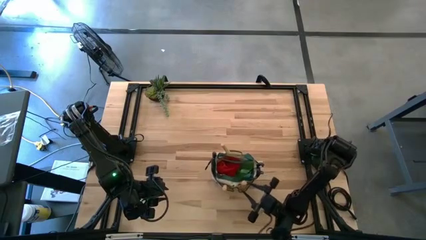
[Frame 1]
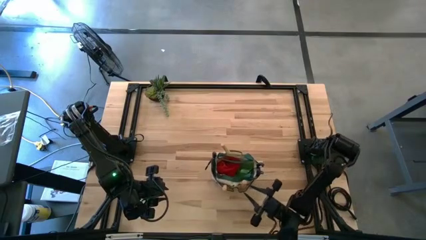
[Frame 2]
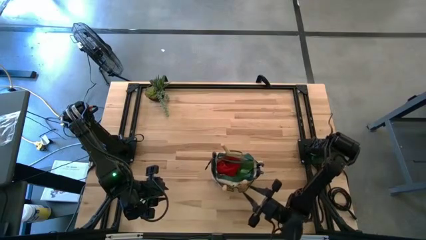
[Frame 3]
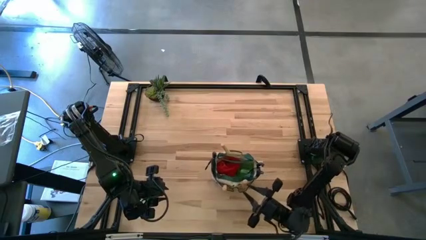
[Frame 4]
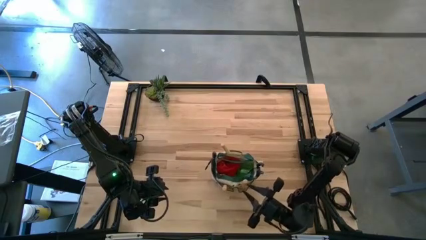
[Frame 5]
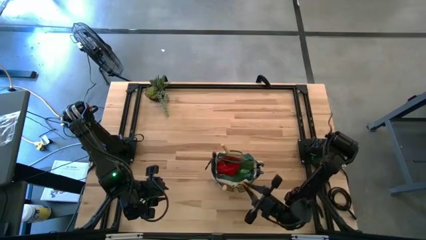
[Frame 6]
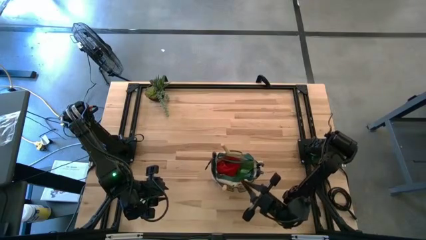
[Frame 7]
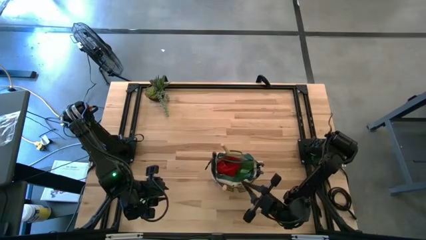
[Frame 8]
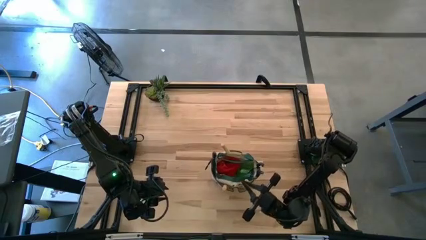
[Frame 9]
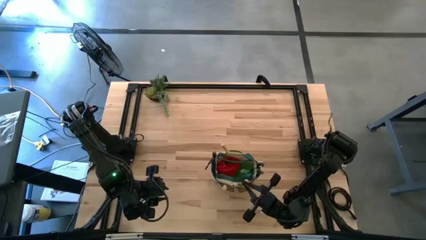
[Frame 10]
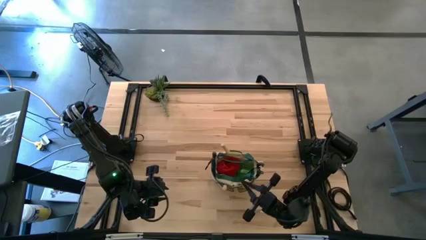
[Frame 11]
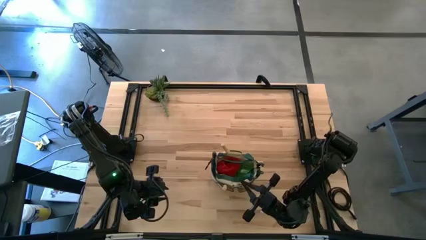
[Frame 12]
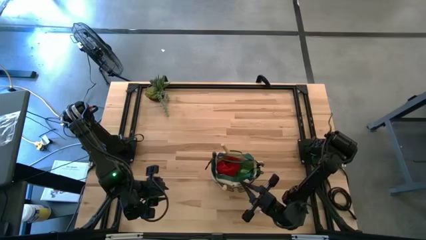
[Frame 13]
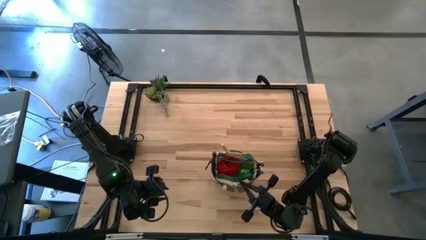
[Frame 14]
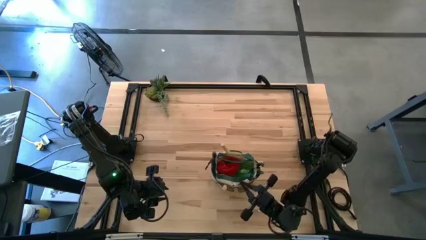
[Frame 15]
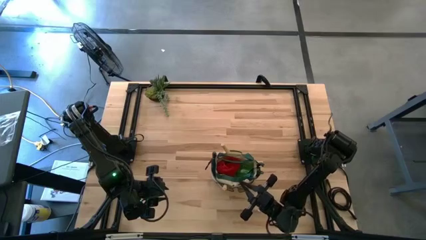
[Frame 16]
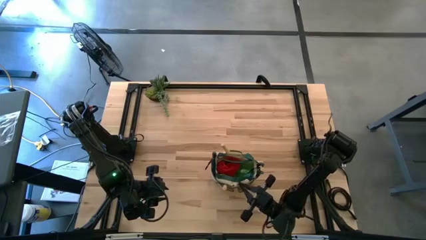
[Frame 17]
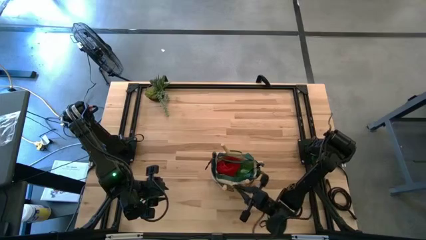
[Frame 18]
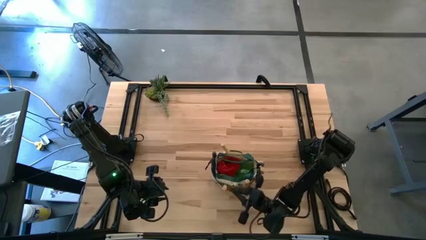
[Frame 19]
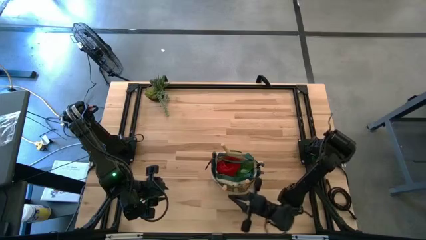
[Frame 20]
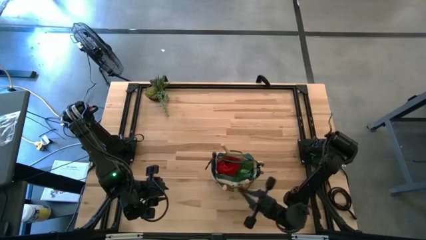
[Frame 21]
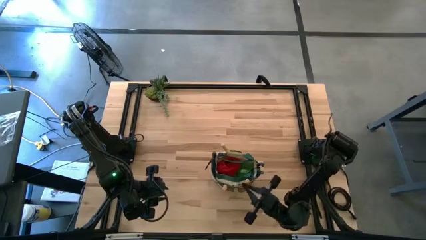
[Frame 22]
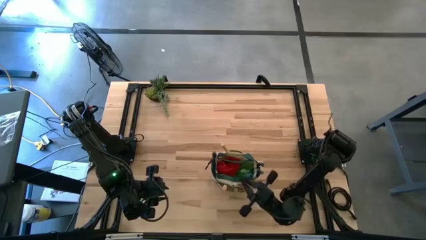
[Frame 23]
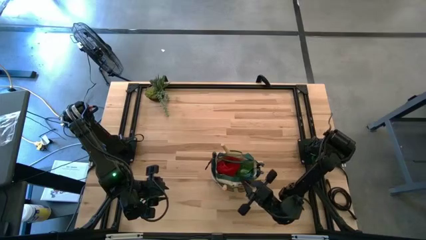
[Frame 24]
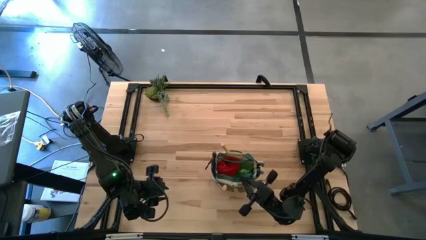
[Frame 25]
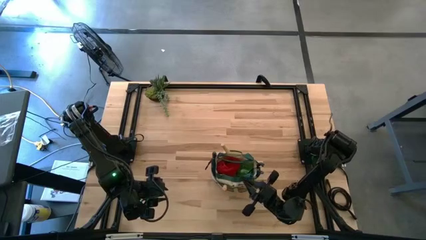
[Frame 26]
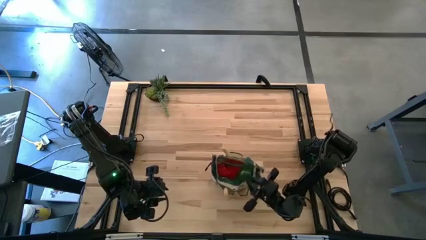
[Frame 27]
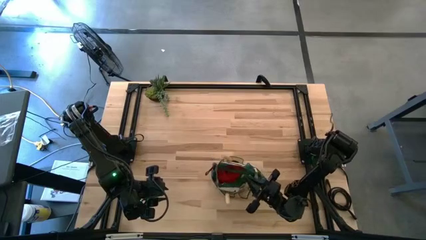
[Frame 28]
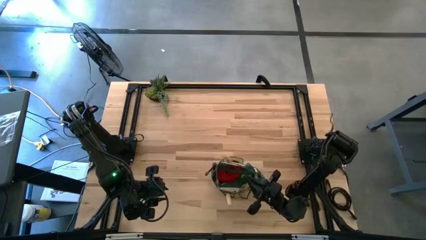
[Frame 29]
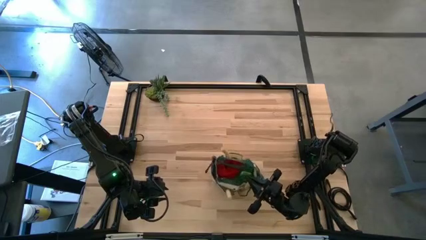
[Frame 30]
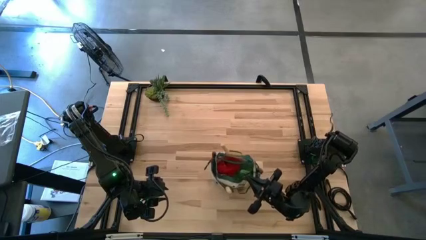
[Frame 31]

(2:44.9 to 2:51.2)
Task: Pick & Place Garden tools in Gardening bag
Adjust the light brown gardening bag on the table

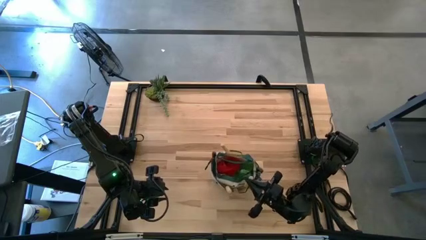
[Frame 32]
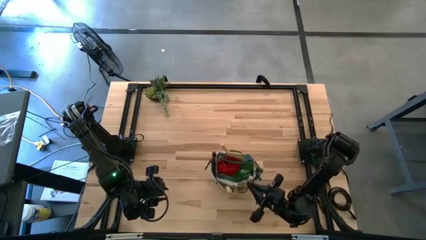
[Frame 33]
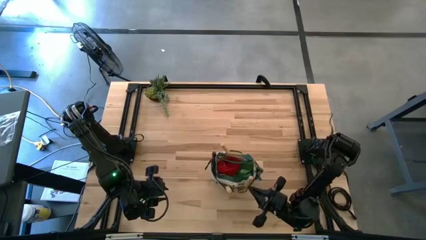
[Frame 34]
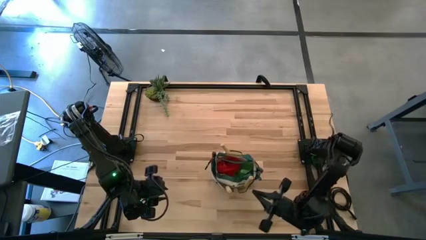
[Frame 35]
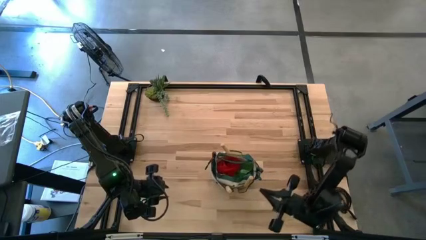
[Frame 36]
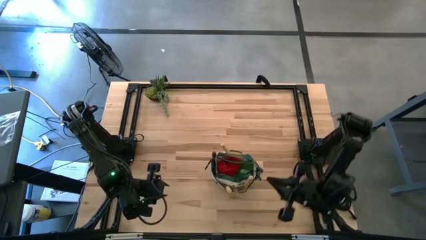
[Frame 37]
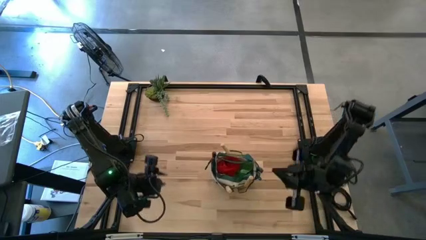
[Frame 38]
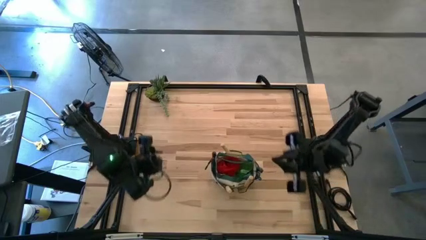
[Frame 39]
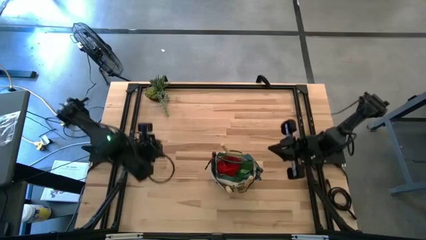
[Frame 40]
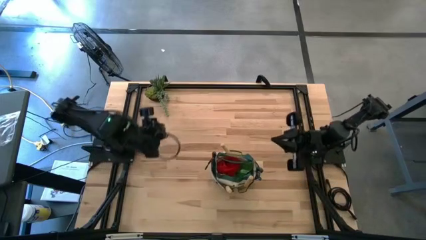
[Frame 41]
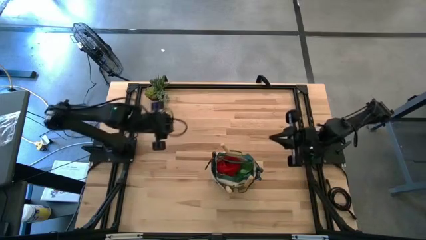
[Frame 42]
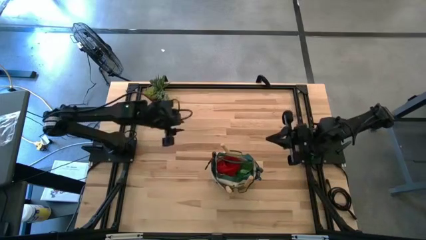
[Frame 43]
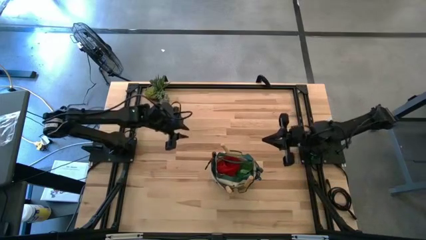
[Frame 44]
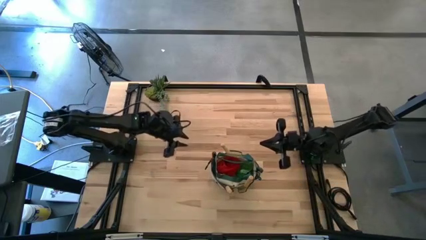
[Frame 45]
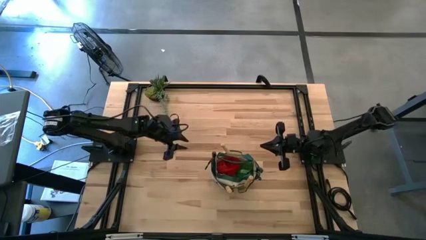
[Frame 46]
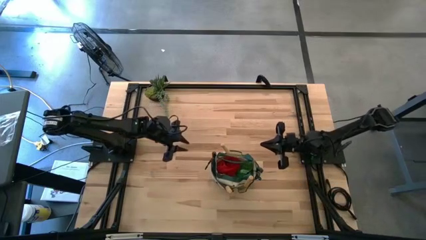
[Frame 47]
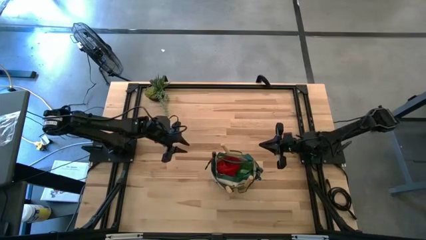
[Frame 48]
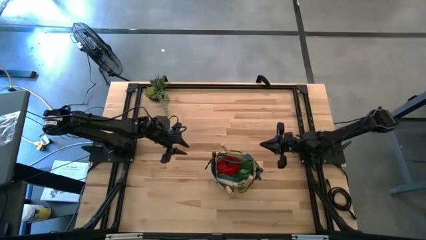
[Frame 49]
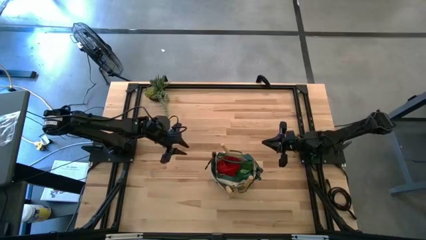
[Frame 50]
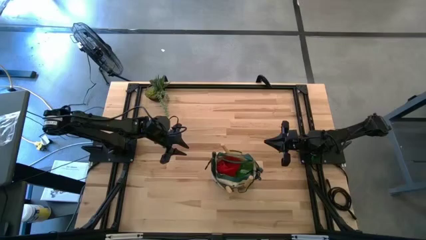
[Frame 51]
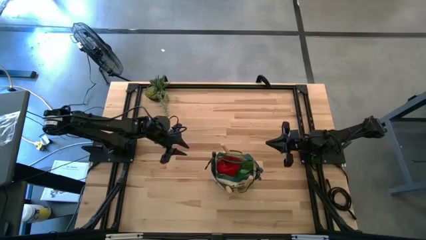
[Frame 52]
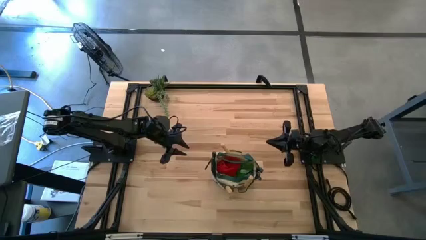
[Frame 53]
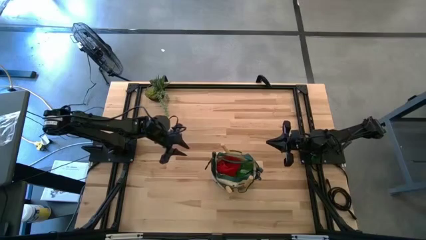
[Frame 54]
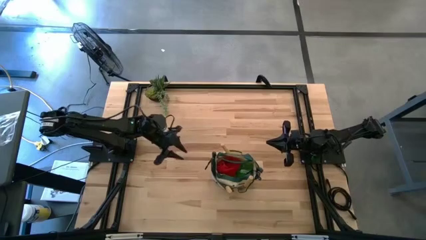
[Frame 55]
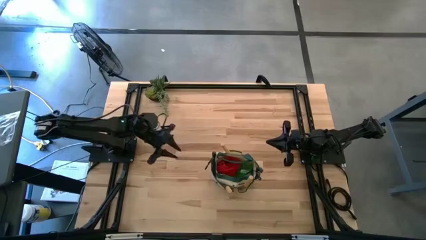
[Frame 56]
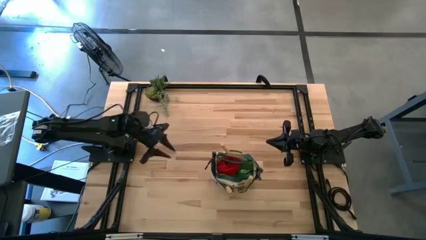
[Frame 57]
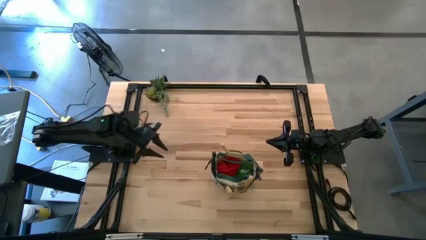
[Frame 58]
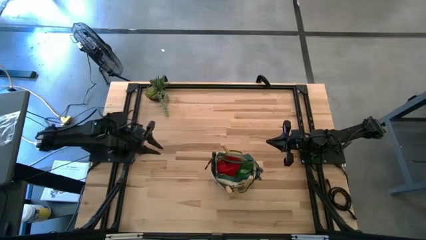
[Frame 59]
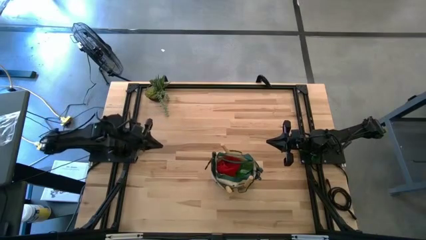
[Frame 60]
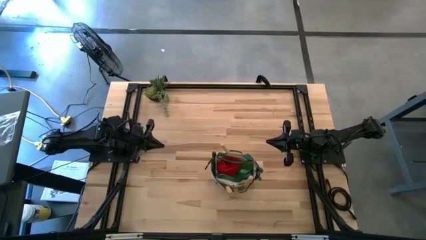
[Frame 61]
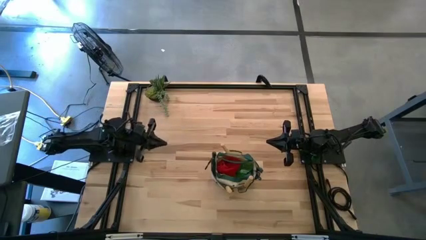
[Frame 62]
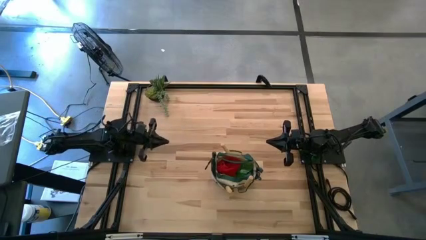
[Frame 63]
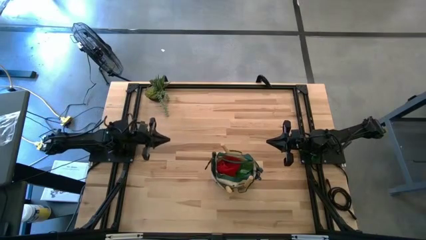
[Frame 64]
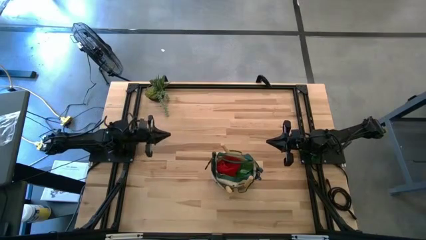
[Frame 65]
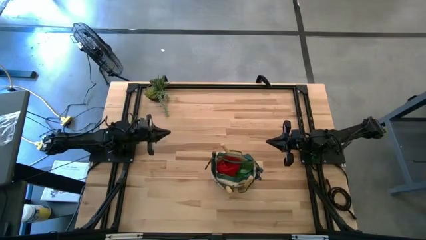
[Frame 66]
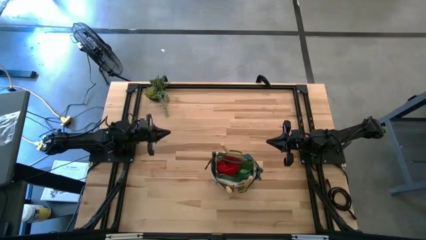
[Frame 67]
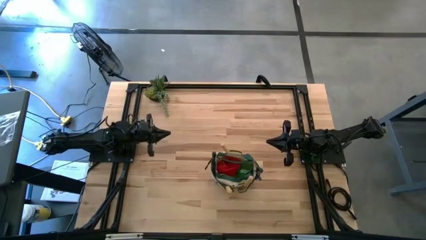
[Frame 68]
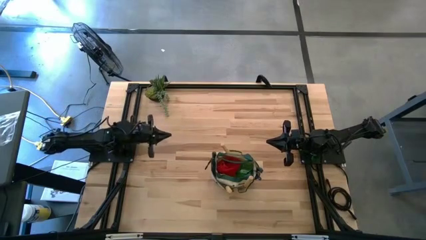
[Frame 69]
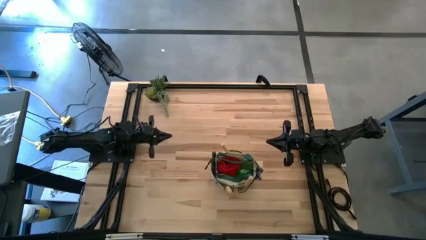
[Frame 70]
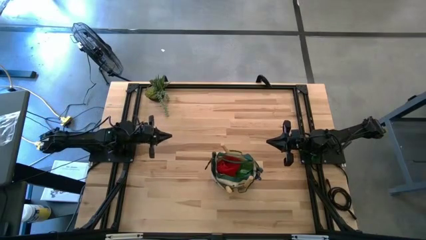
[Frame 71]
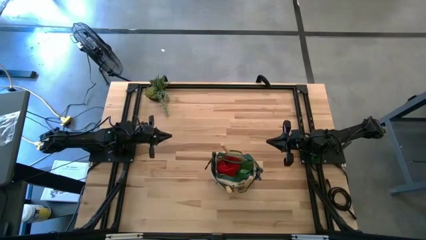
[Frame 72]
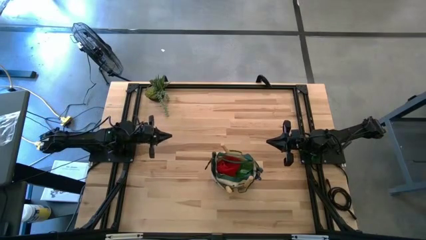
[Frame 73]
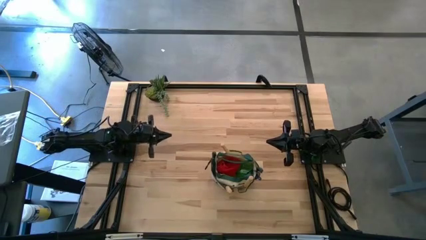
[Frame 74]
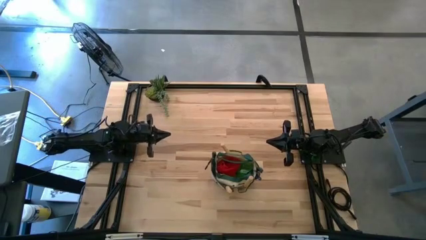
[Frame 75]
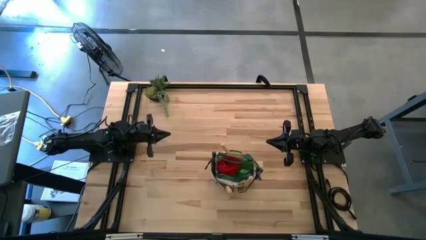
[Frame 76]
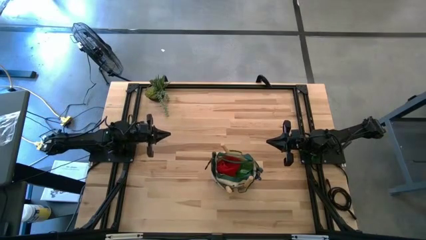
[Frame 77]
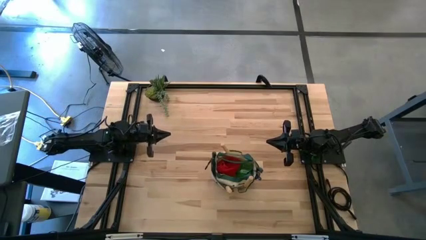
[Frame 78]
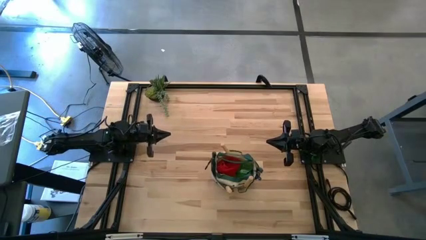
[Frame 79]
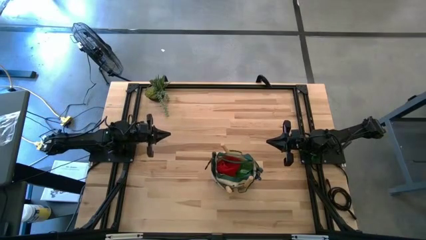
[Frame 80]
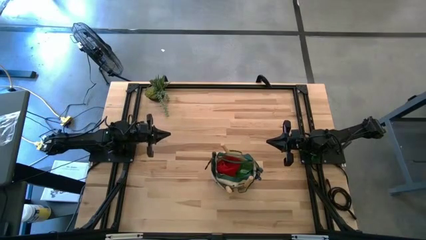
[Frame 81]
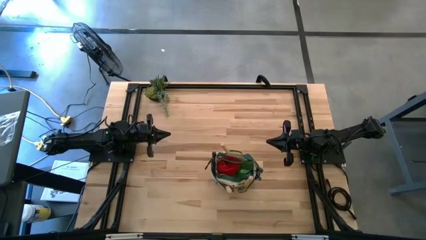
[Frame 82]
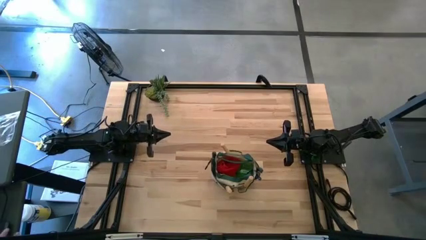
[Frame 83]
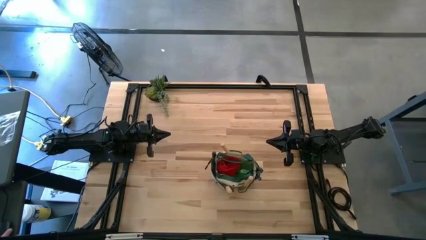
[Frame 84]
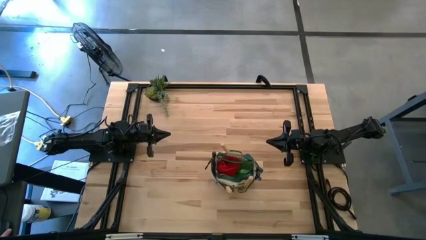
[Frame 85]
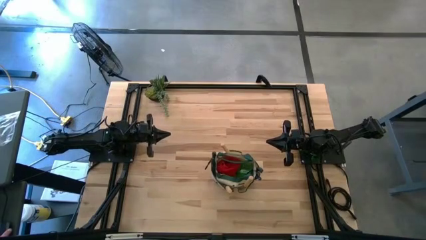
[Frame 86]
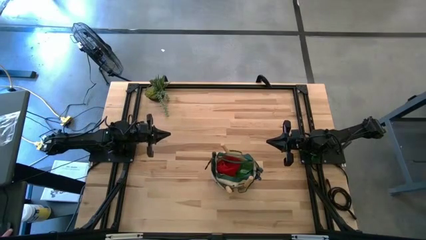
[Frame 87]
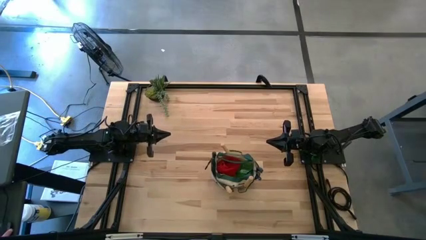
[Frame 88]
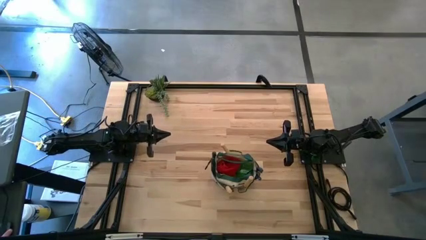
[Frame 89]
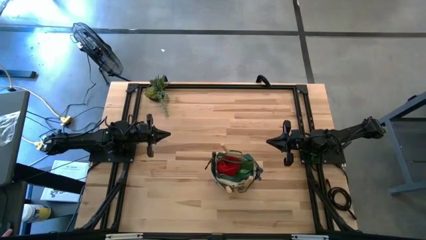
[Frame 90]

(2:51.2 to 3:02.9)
Return to Home Position
